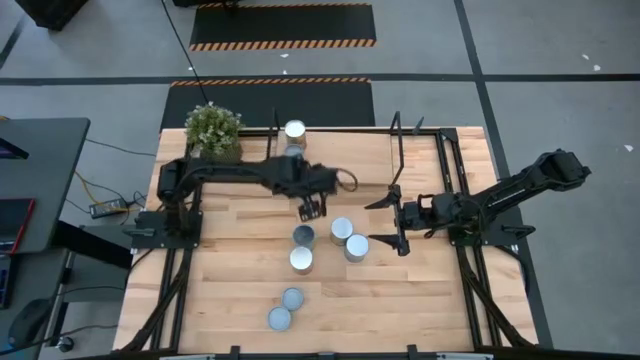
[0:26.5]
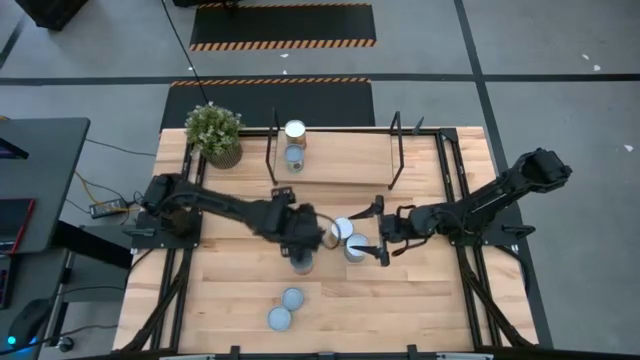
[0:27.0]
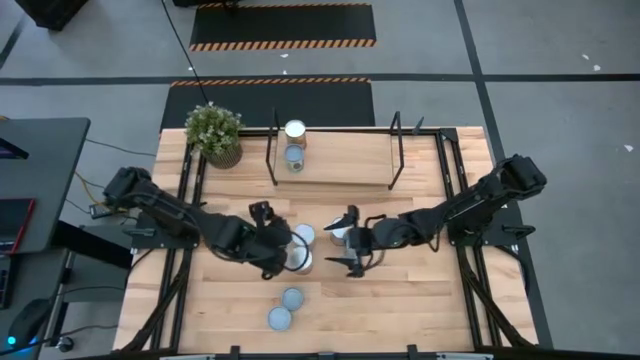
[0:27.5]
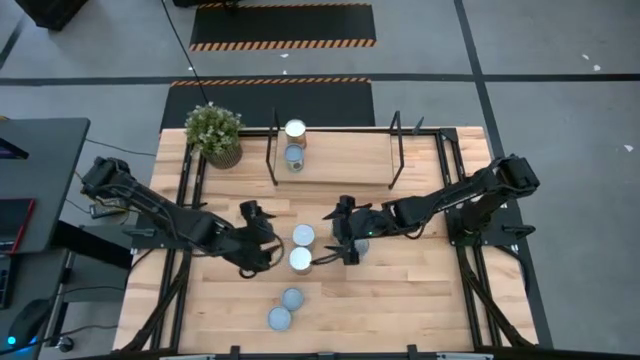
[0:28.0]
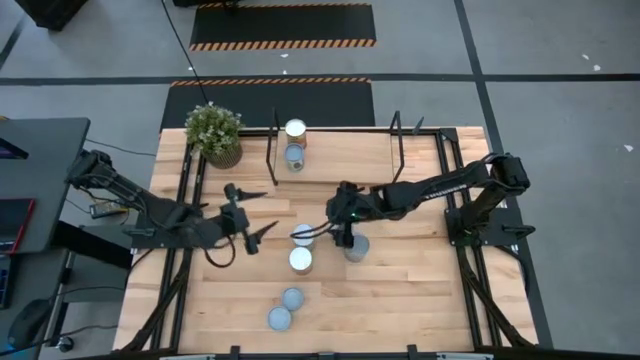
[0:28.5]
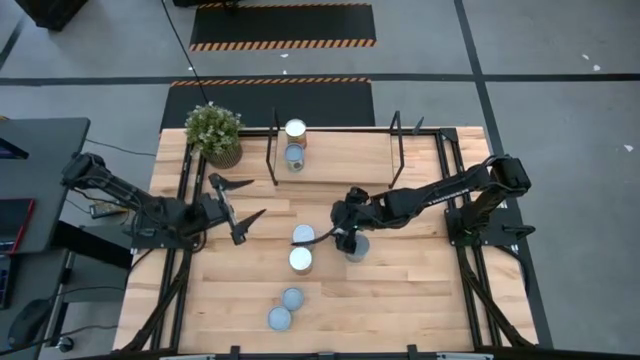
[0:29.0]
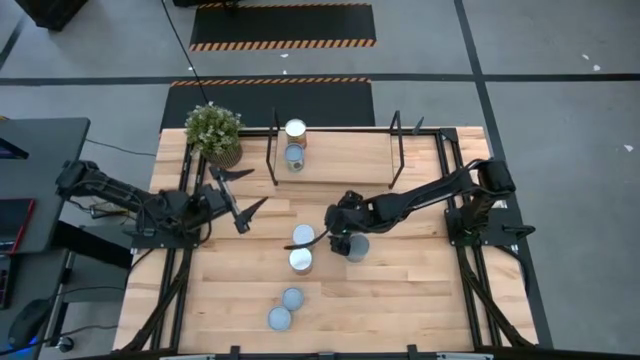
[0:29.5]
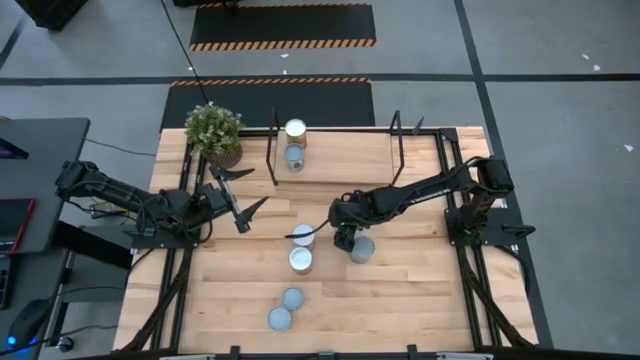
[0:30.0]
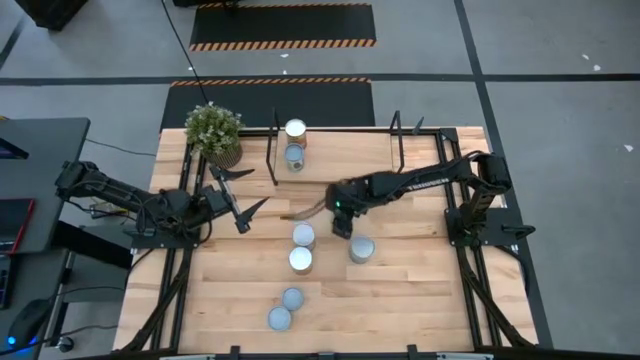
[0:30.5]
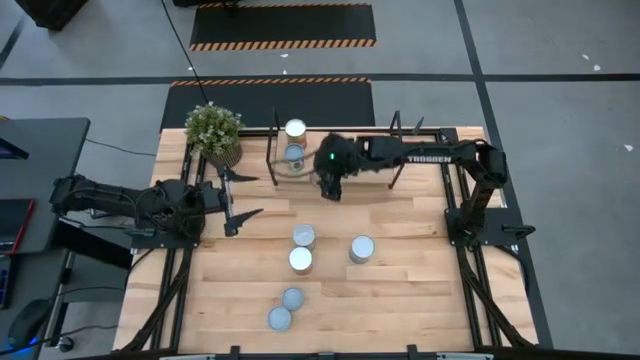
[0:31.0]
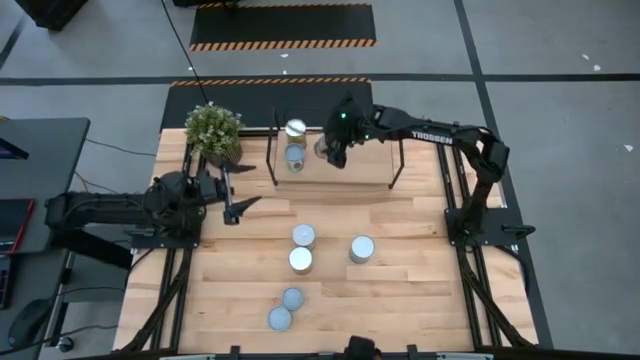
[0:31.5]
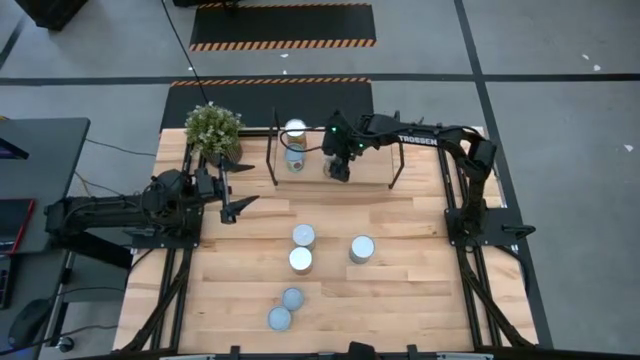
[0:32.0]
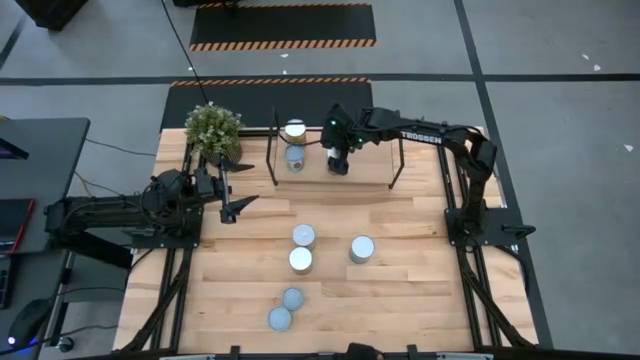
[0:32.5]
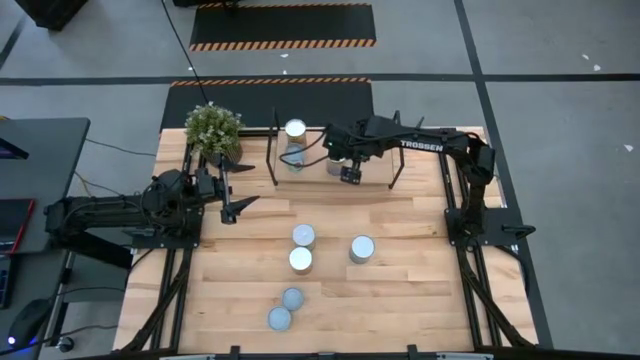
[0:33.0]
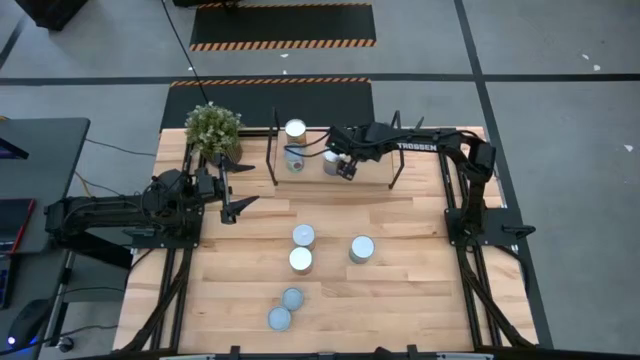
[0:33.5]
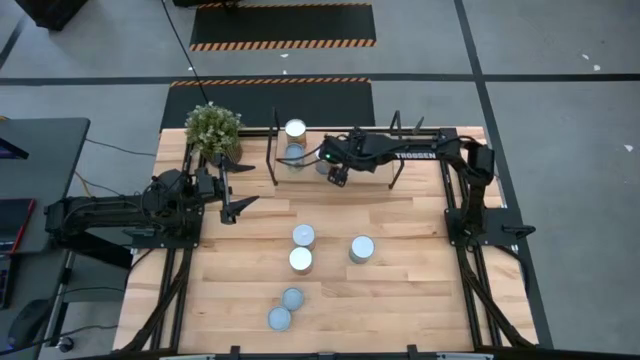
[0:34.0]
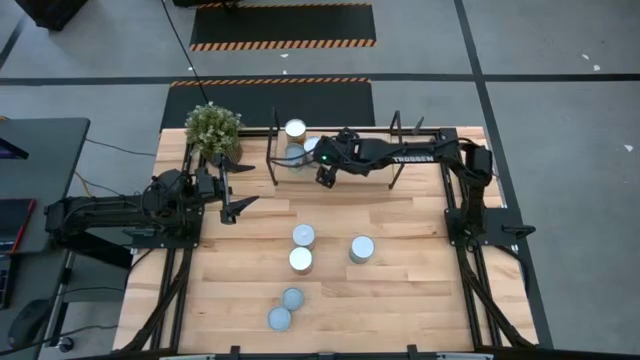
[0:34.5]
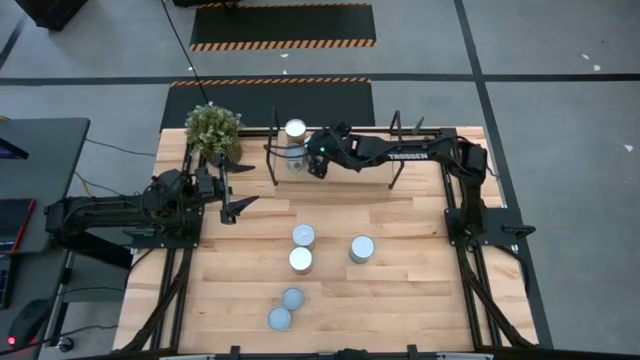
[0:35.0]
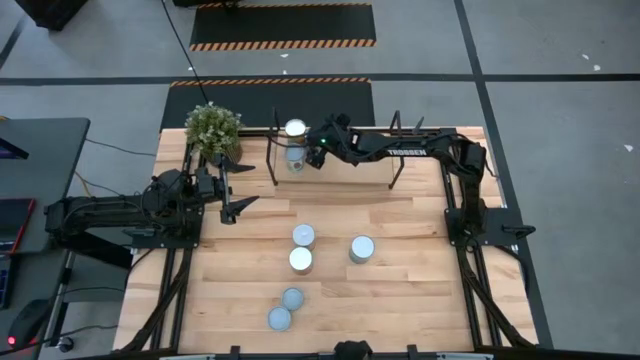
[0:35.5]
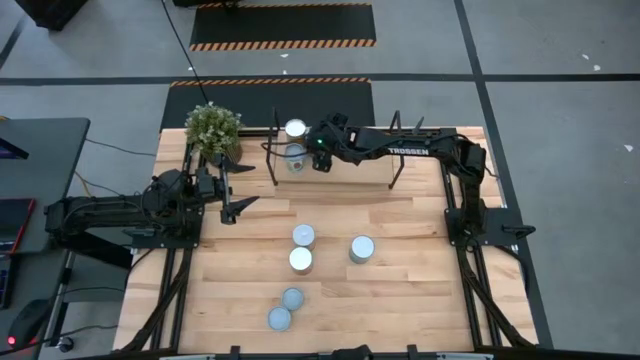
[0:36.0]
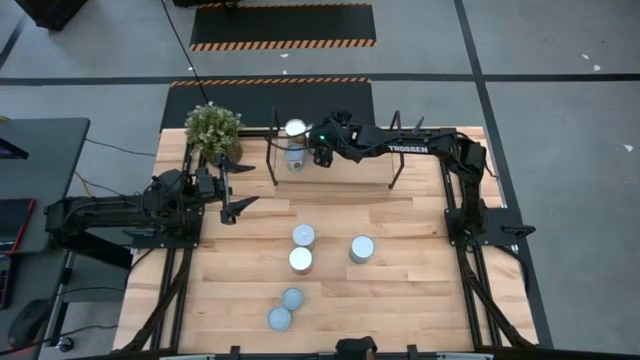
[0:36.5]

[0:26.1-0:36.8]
Task: Pick and place cans onto a shelf
Put the canned peaches on the shelf

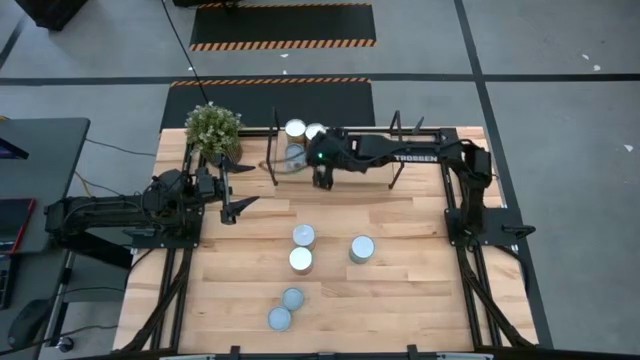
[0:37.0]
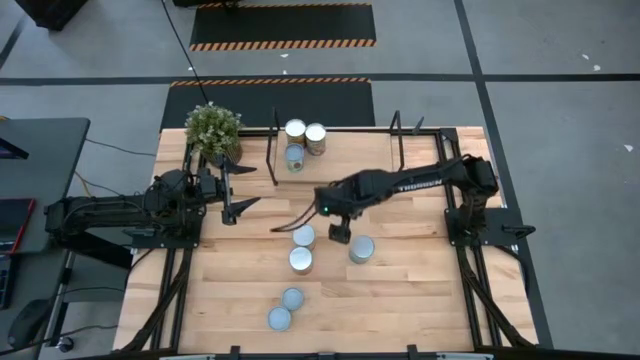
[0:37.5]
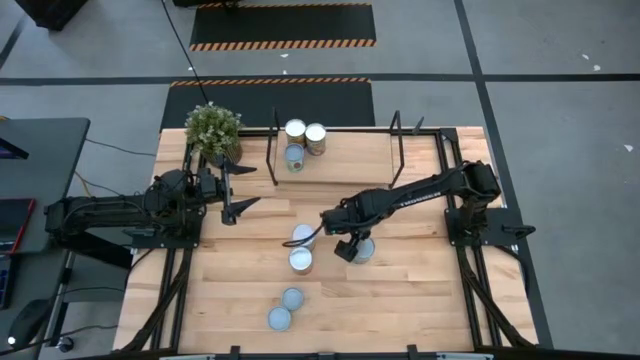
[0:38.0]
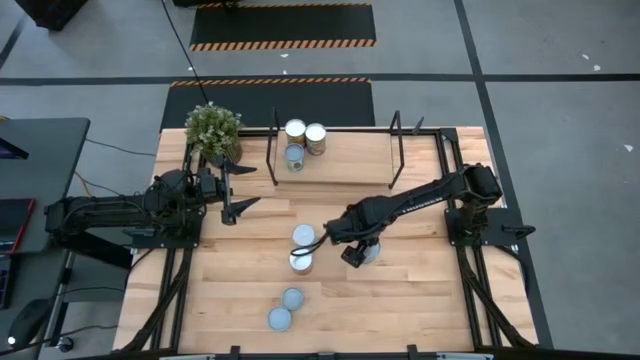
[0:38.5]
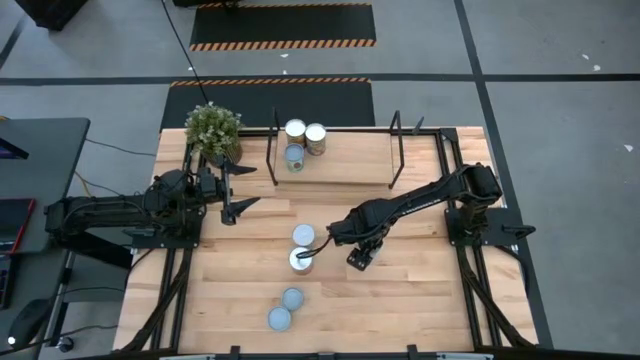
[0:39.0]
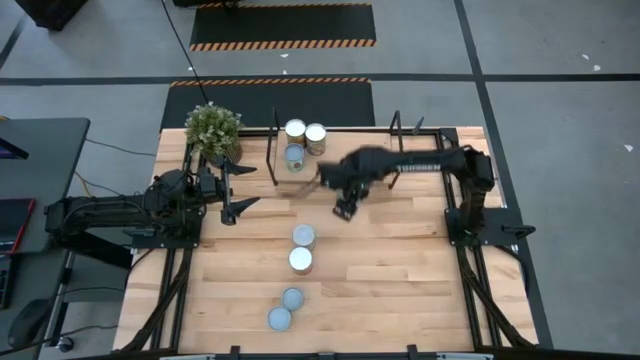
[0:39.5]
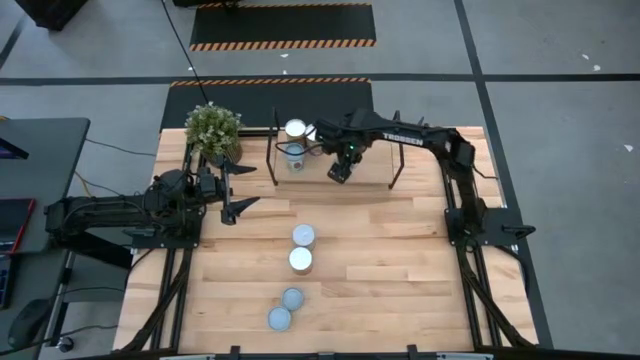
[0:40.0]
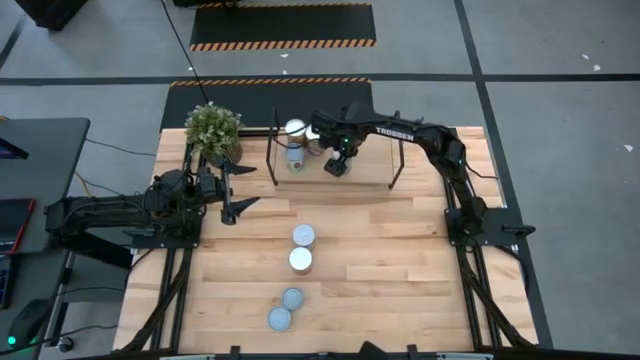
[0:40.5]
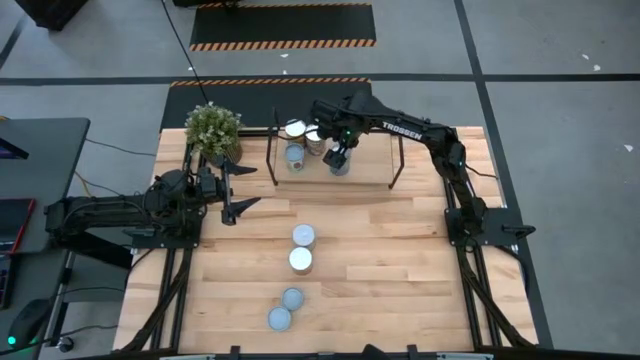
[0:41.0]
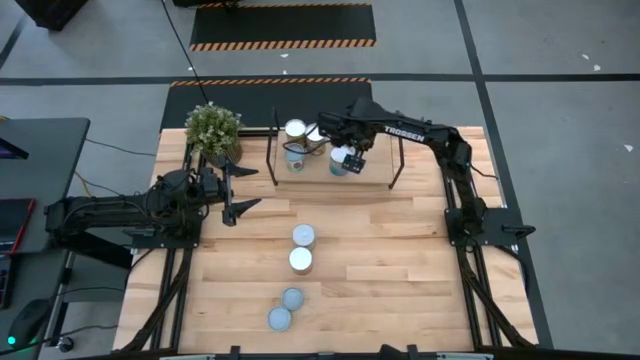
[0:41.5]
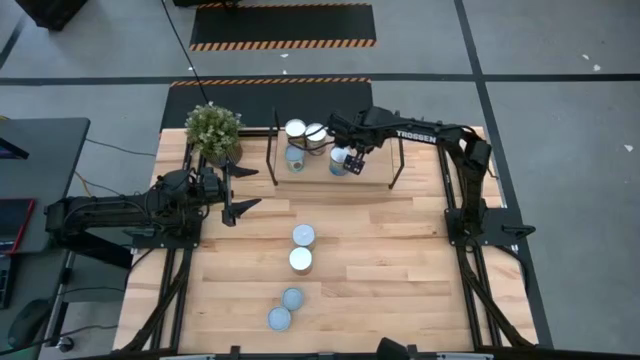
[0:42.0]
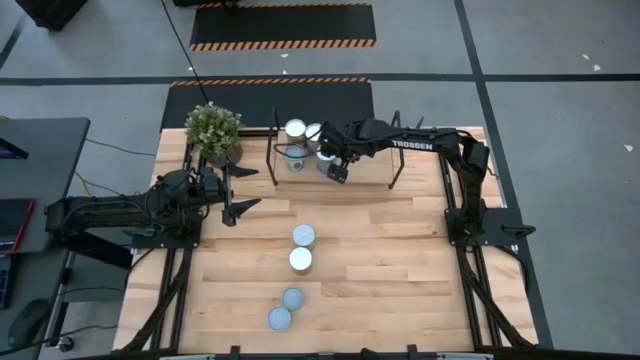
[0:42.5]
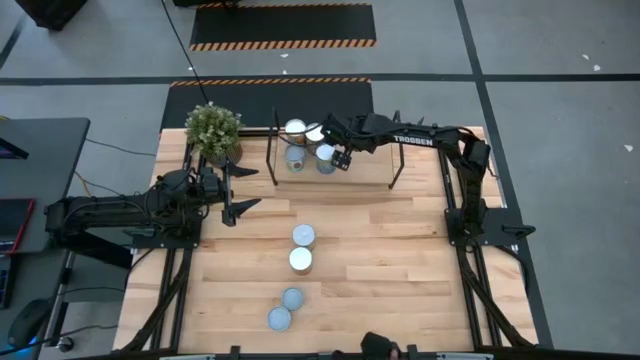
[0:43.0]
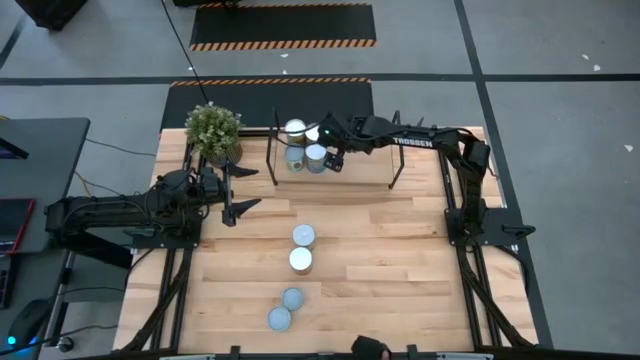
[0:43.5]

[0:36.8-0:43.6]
Put the canned cherries on the shelf

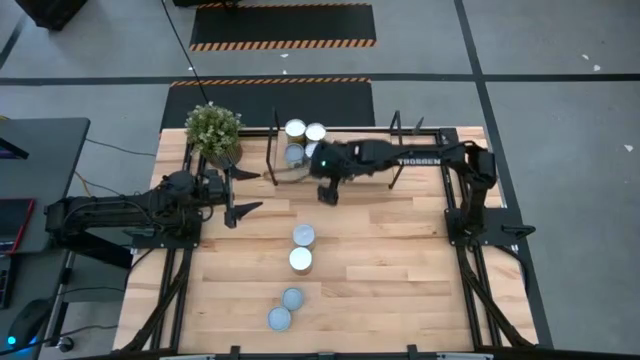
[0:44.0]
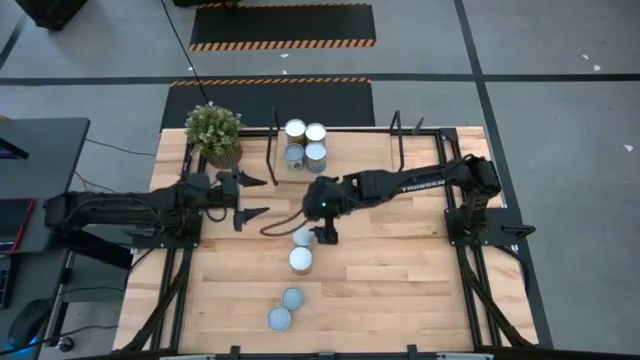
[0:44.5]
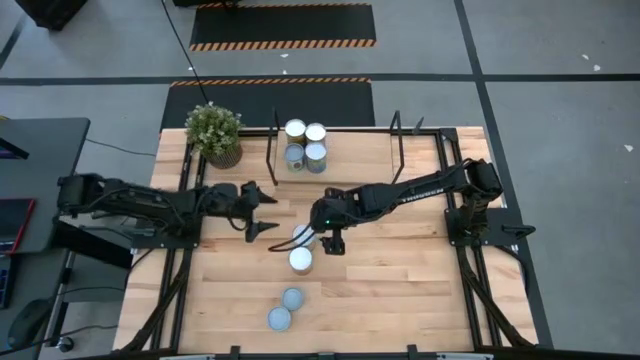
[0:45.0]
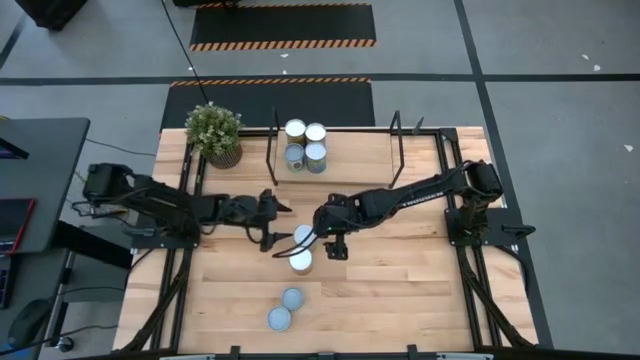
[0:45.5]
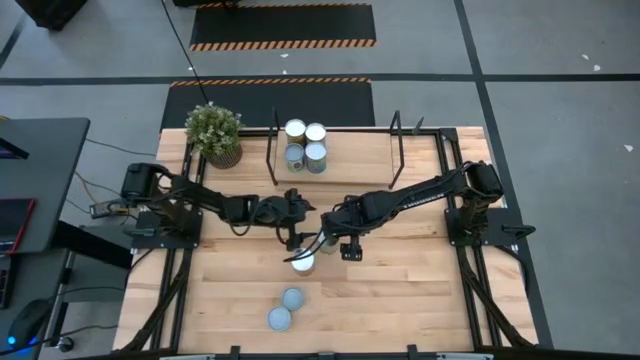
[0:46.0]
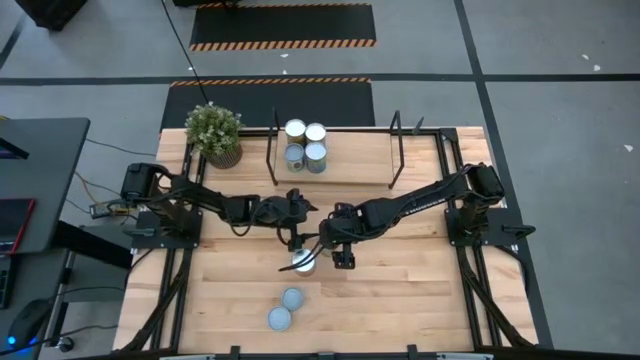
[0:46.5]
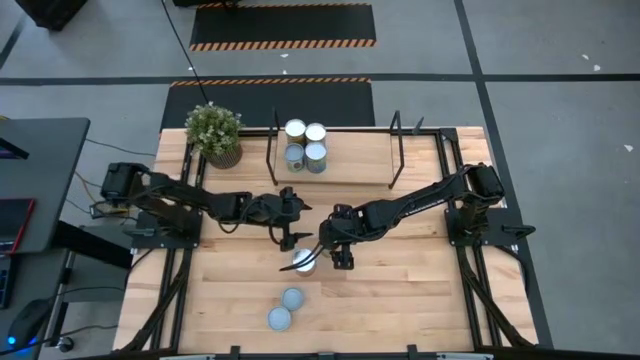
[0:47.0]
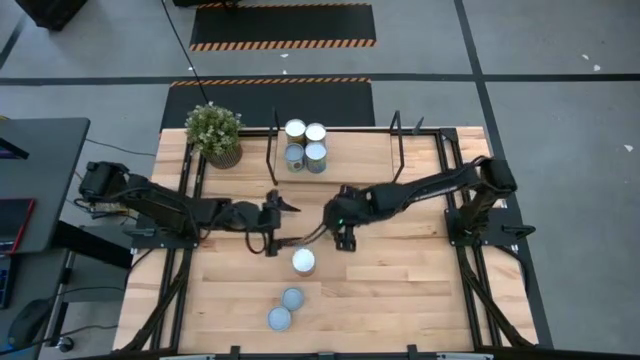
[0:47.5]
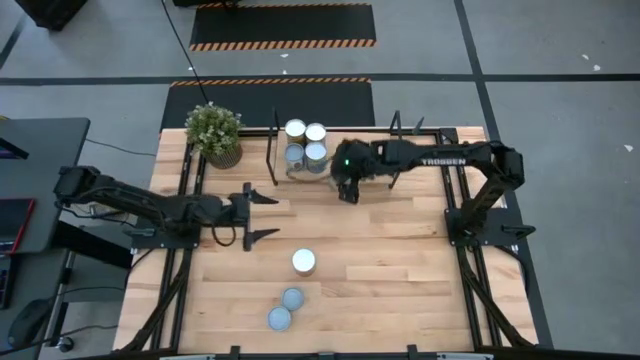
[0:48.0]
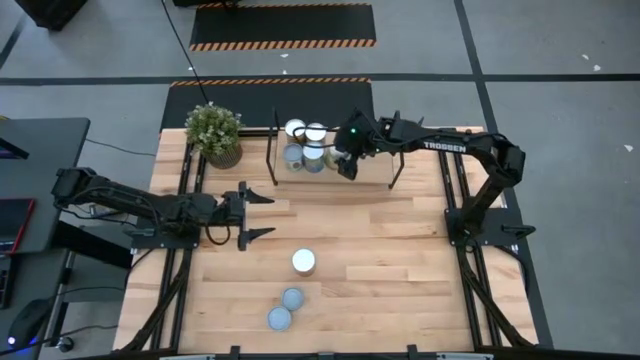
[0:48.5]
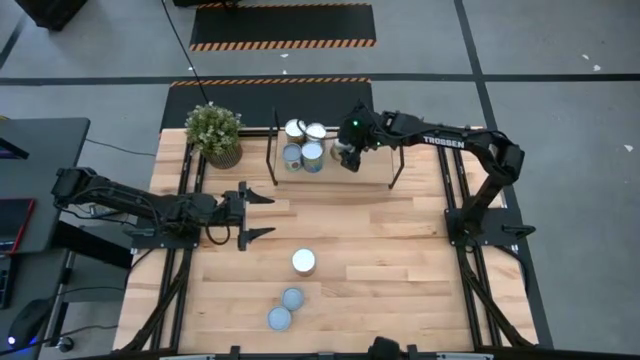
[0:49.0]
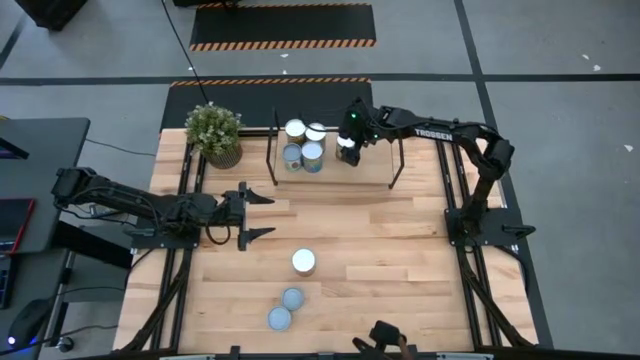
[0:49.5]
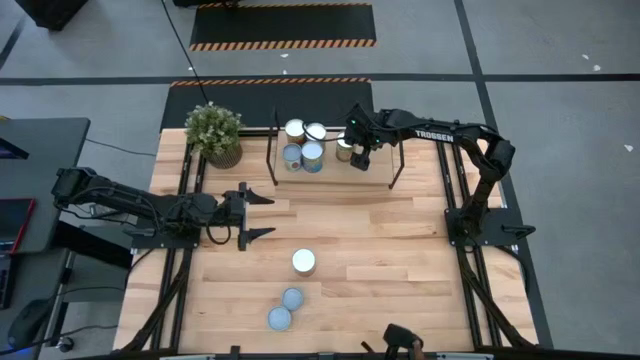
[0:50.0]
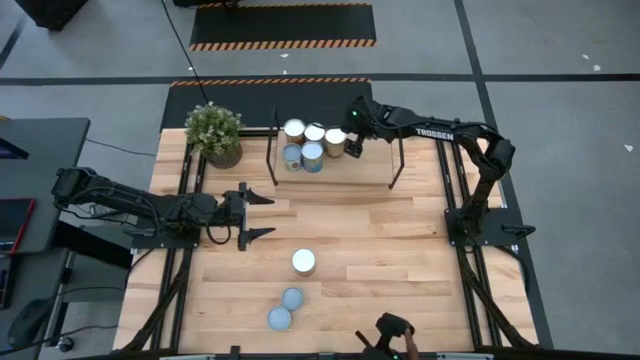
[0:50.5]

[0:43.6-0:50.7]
Put the canned oranges on the shelf
